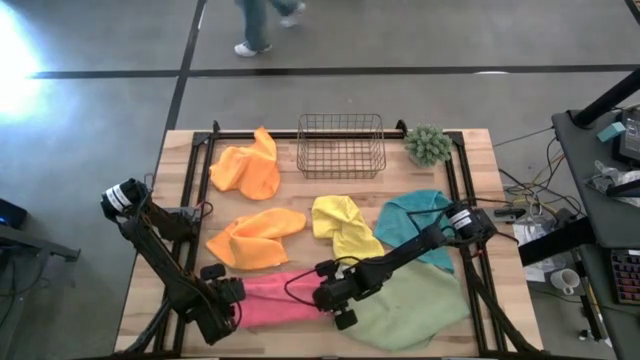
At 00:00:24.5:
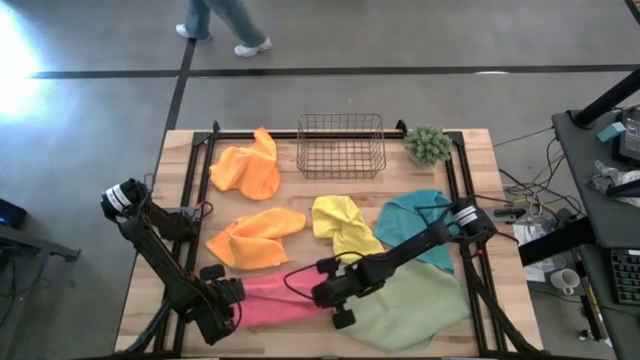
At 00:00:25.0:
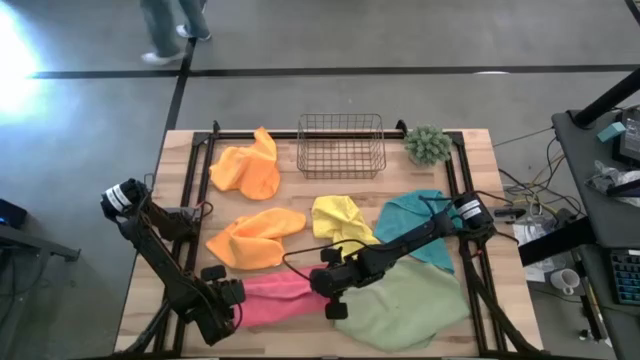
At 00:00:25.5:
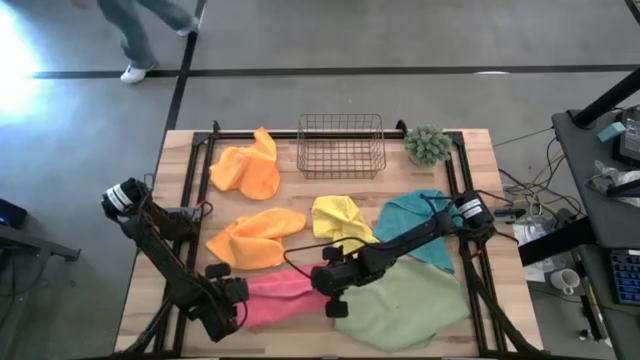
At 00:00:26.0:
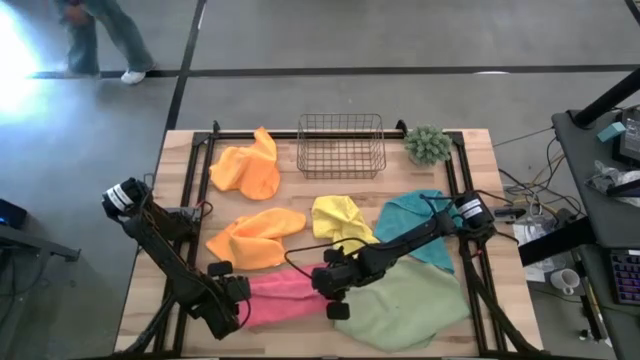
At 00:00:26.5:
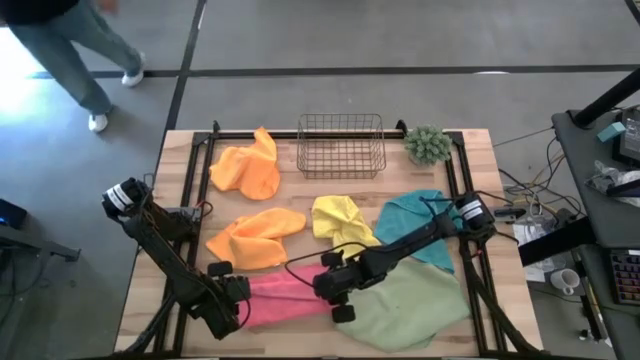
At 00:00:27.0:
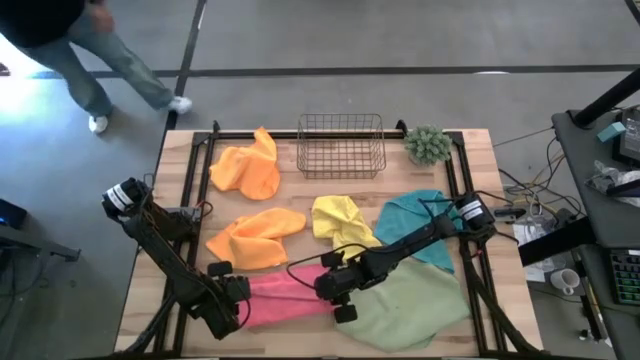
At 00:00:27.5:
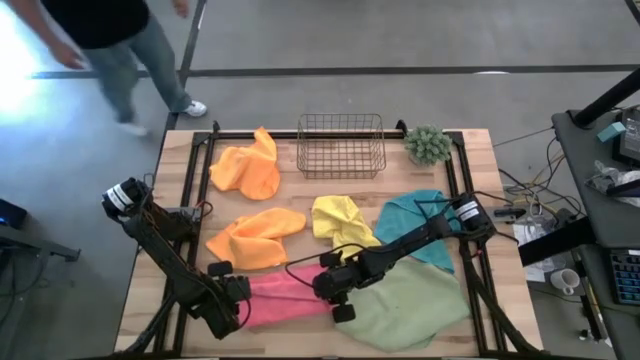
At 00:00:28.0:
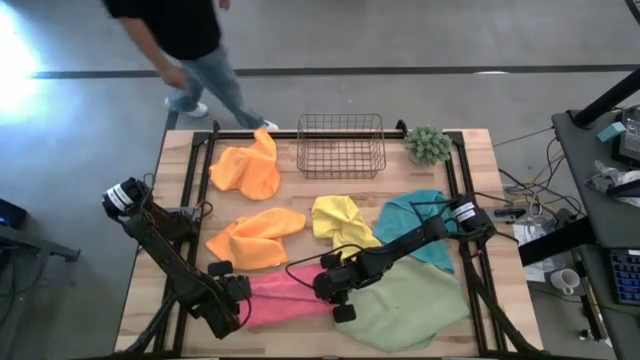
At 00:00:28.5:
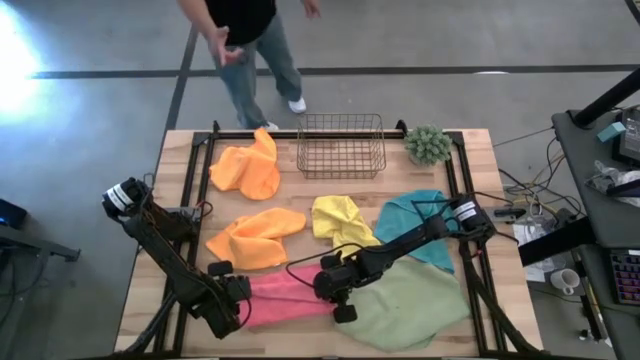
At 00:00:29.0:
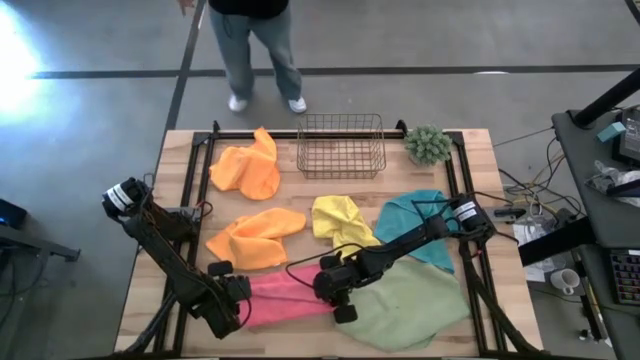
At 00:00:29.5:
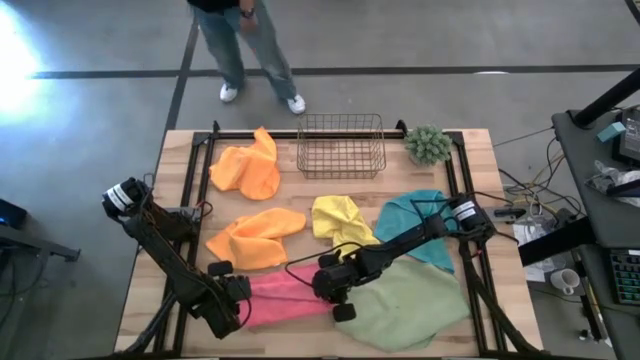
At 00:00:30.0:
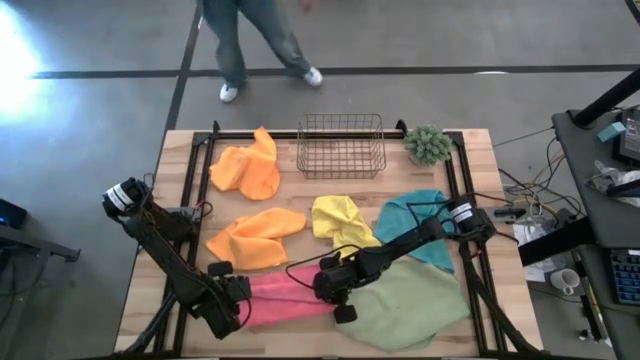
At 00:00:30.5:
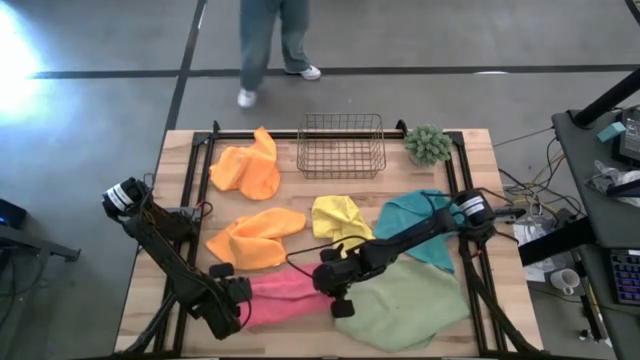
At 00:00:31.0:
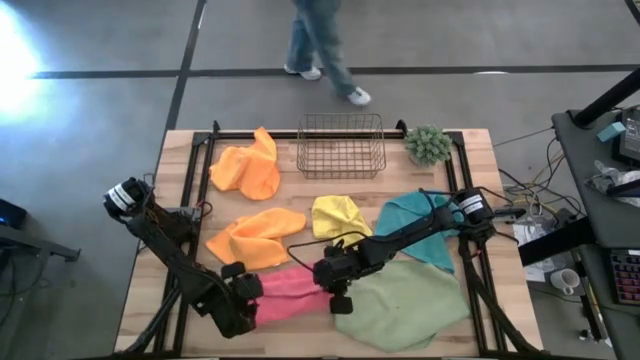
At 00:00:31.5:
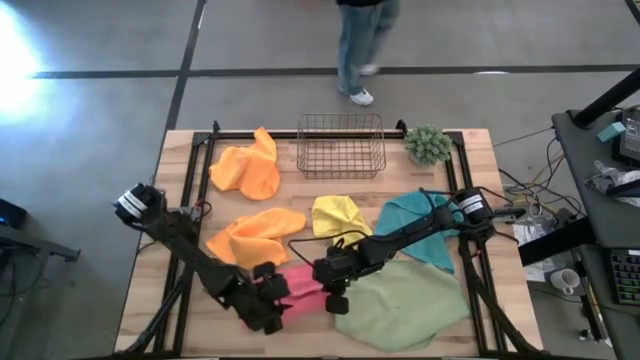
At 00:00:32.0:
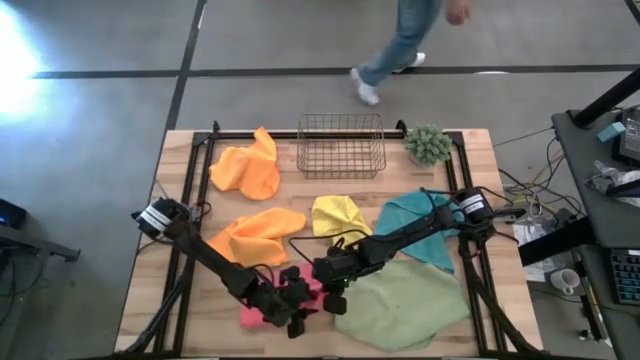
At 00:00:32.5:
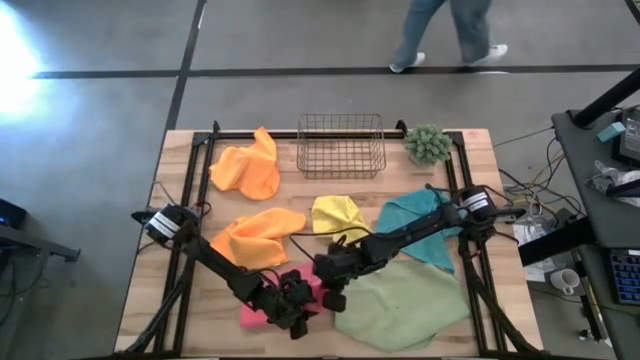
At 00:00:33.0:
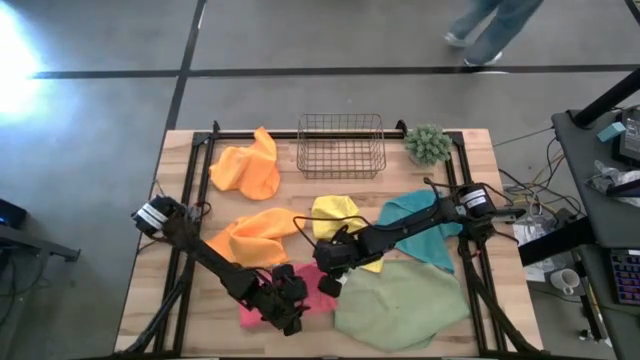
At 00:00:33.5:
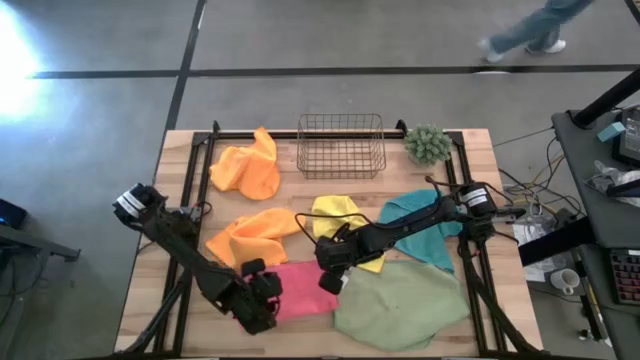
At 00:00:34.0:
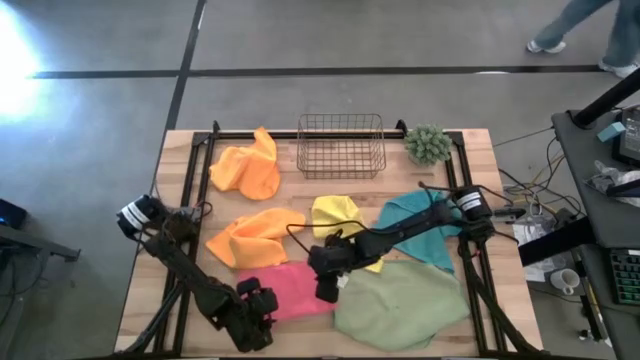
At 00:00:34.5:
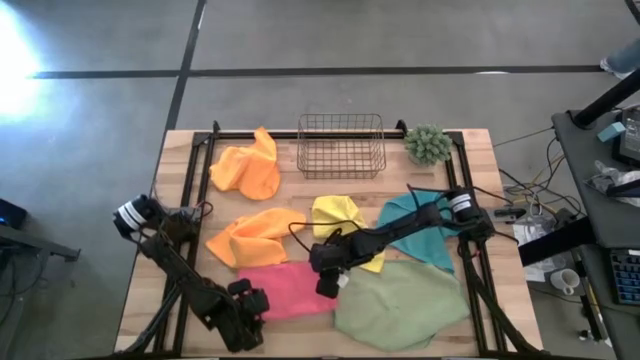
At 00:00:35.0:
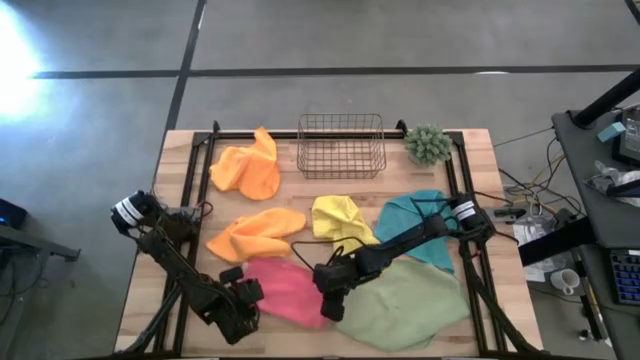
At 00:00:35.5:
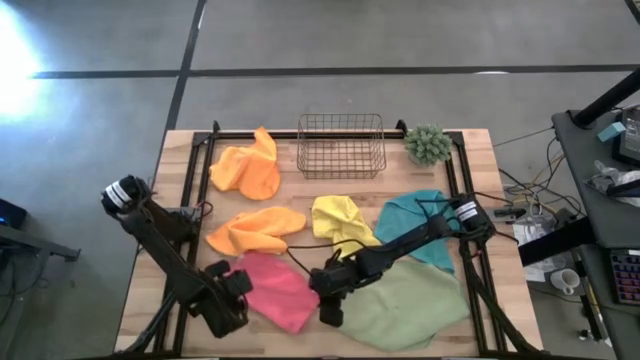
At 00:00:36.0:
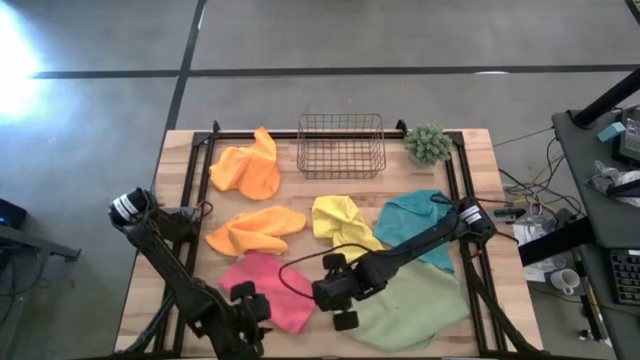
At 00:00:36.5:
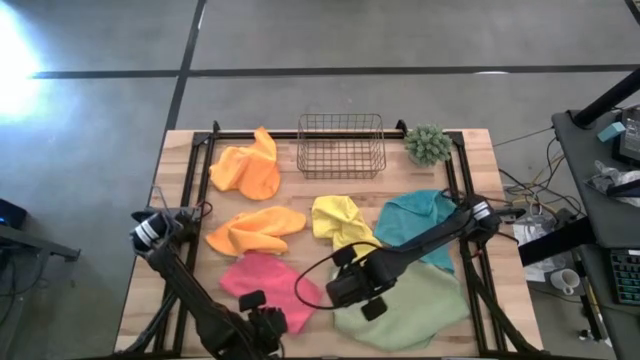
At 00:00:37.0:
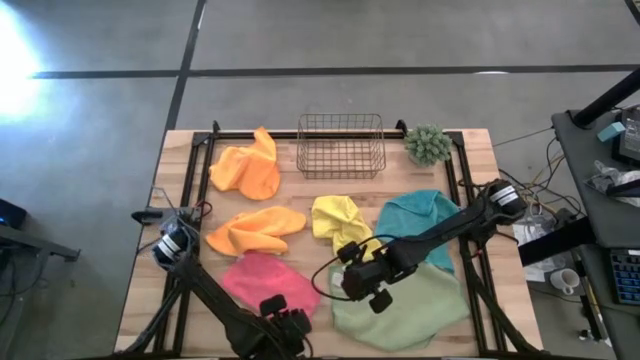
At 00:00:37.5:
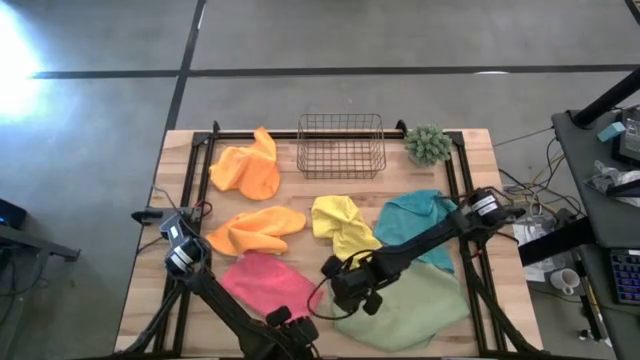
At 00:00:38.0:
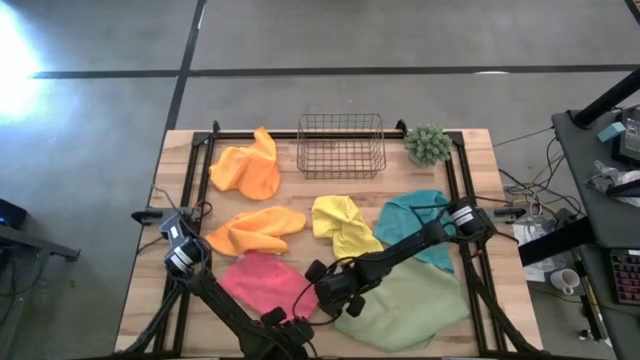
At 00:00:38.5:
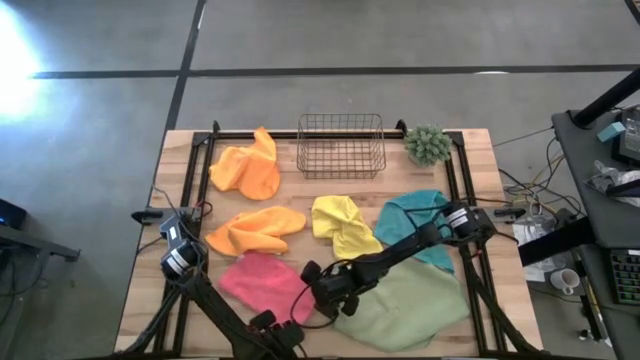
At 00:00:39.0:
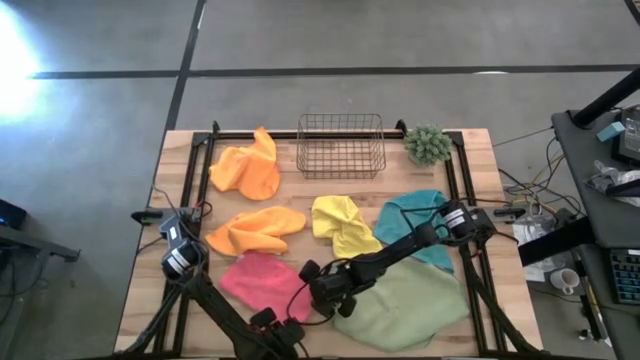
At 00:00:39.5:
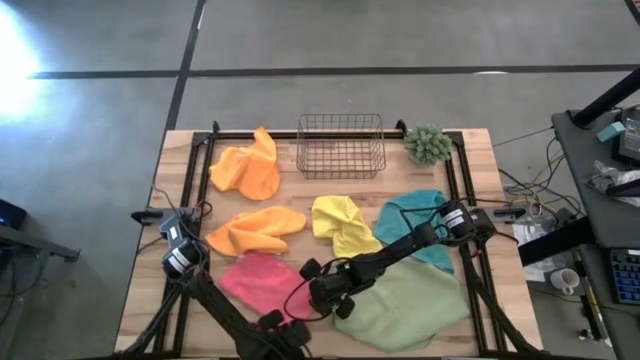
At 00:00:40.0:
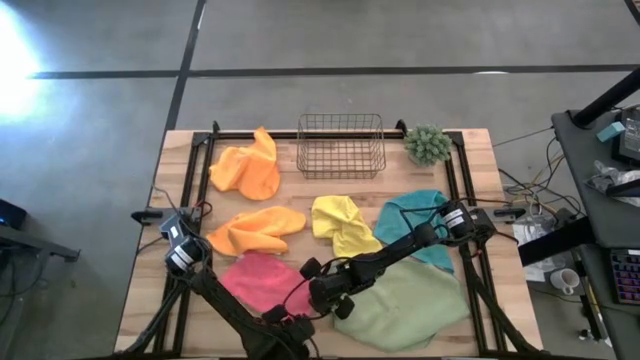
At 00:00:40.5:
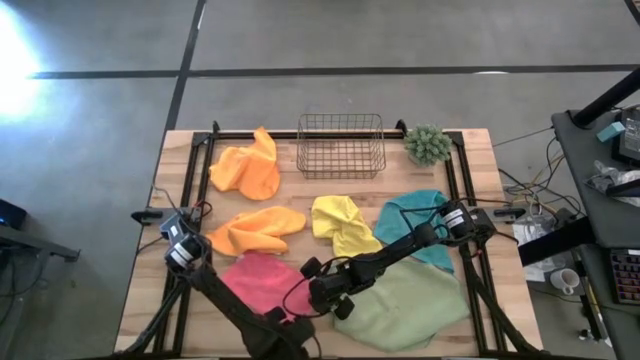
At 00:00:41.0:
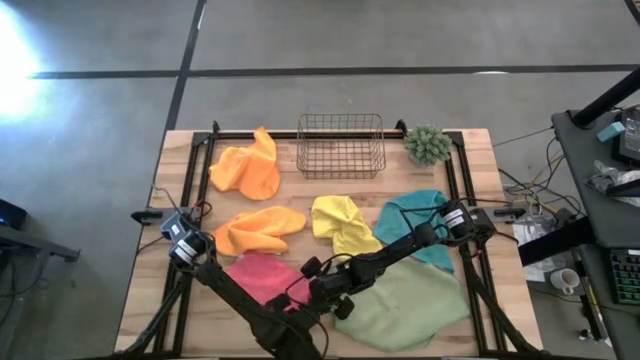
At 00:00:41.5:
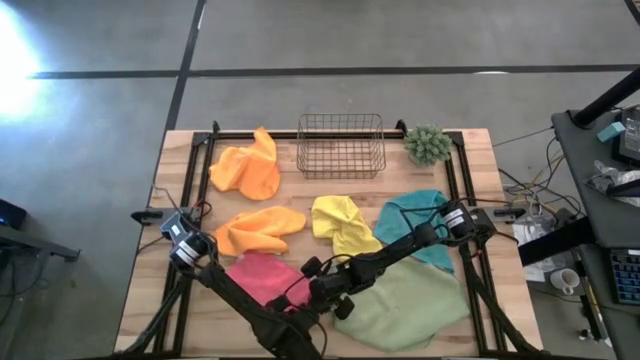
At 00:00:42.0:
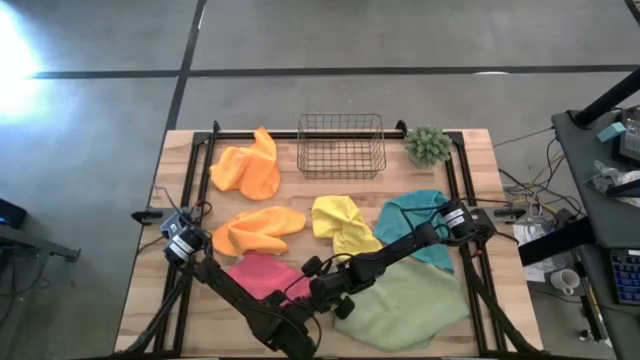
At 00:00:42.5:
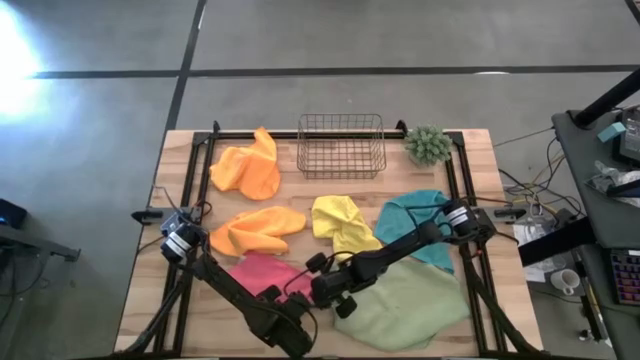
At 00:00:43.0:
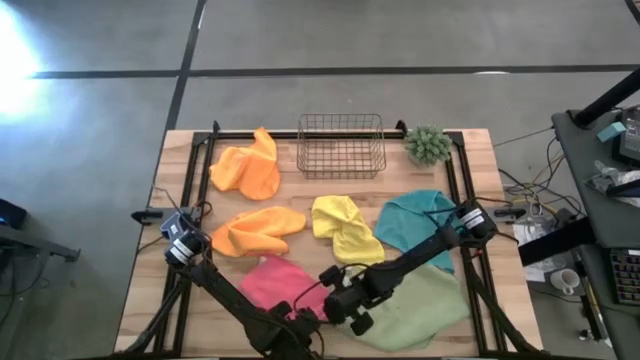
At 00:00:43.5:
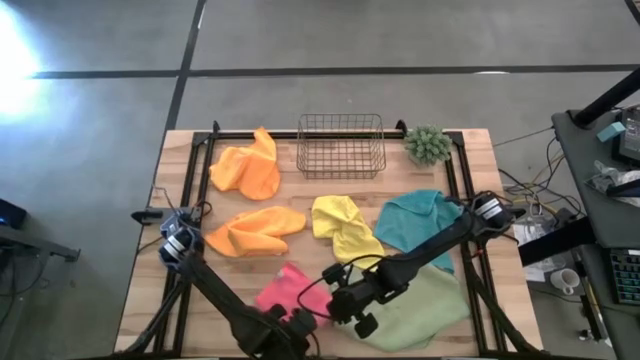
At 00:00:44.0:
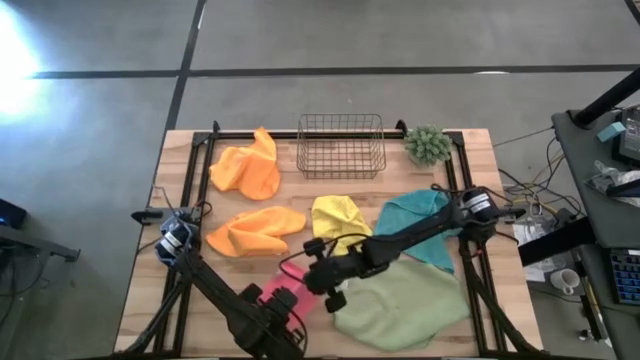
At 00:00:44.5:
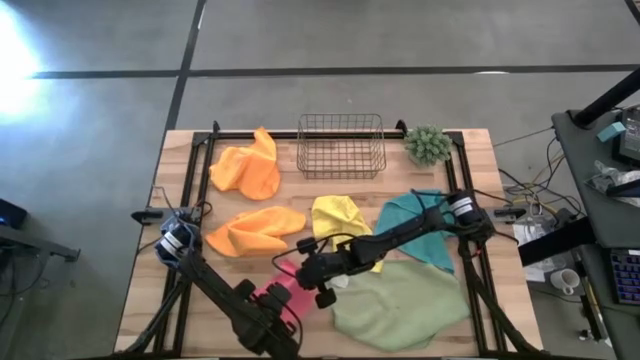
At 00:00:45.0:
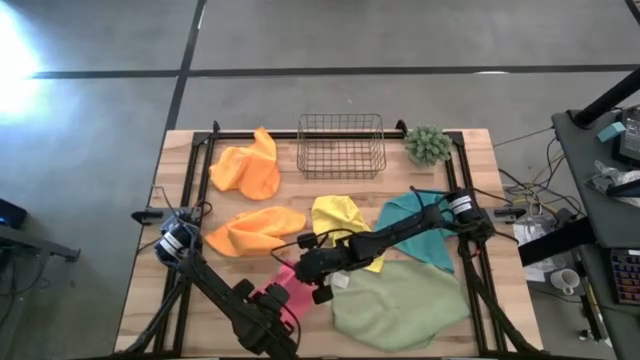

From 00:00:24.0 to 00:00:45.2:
Task: Fold microfiber towels
Fold the pink microfiber cloth
